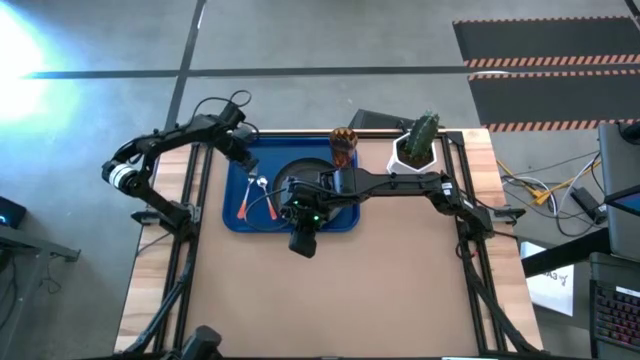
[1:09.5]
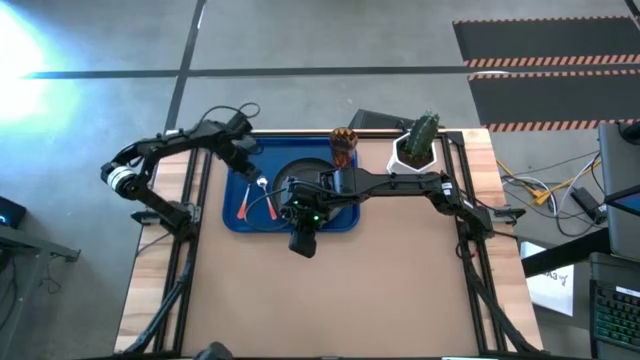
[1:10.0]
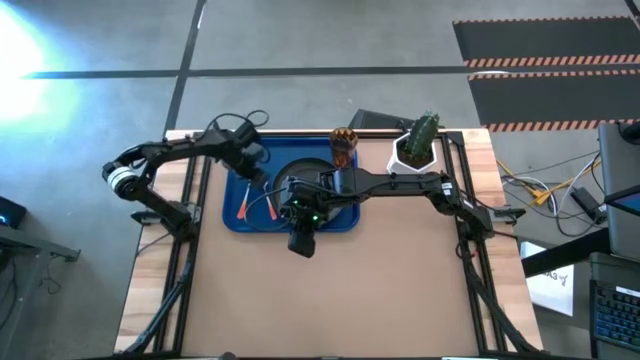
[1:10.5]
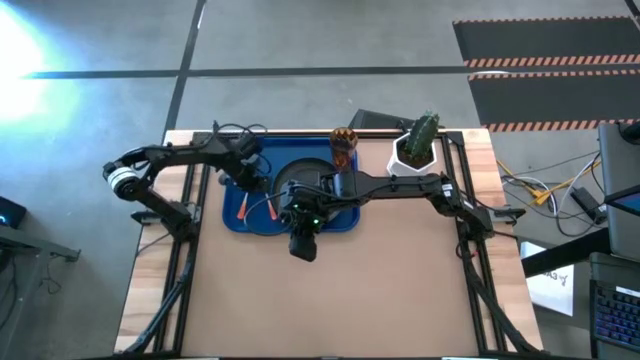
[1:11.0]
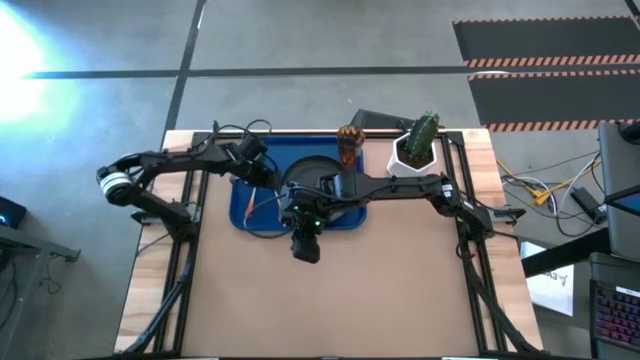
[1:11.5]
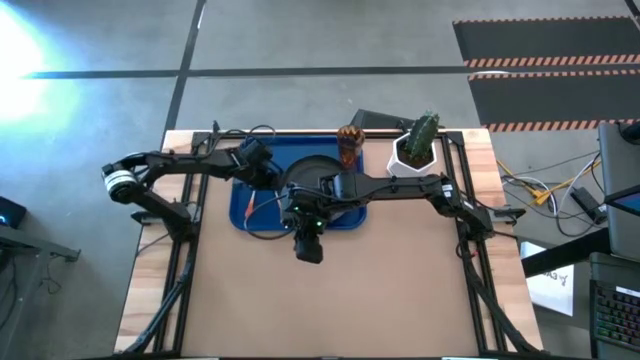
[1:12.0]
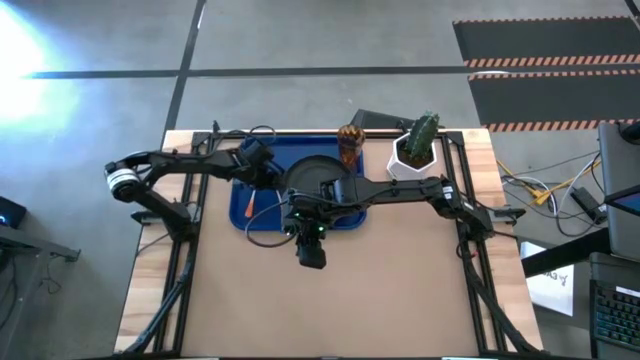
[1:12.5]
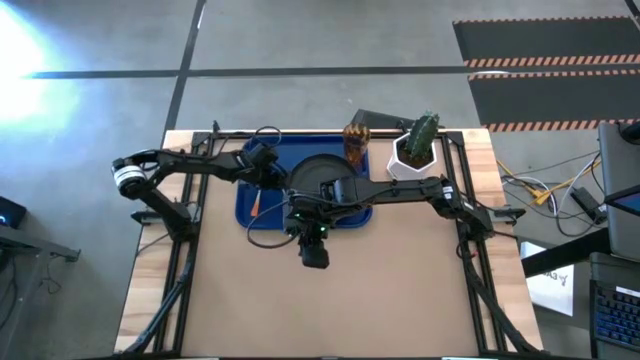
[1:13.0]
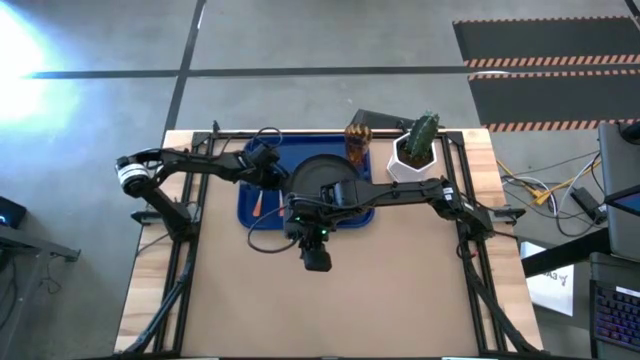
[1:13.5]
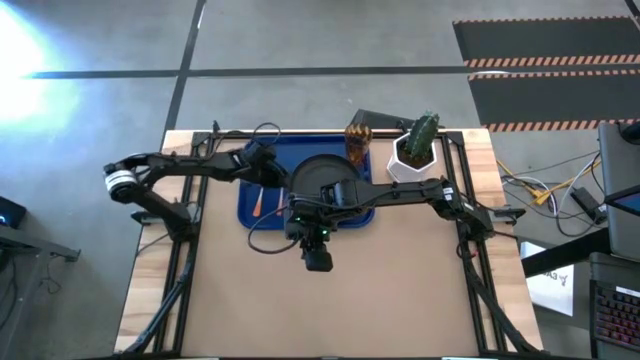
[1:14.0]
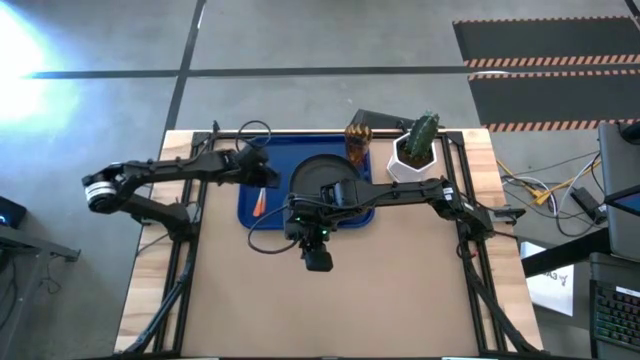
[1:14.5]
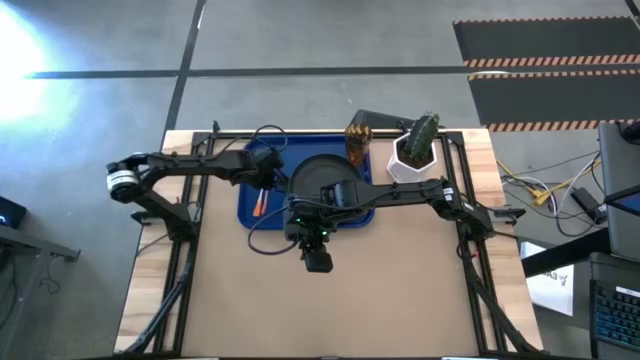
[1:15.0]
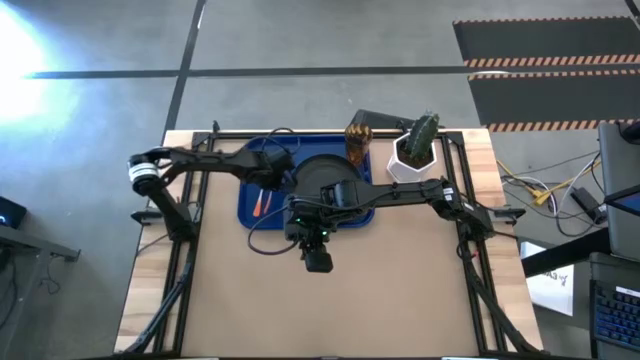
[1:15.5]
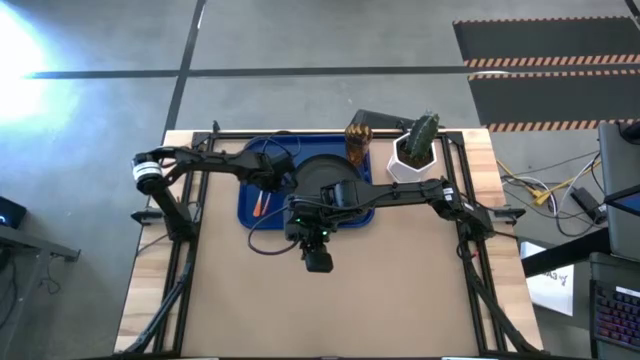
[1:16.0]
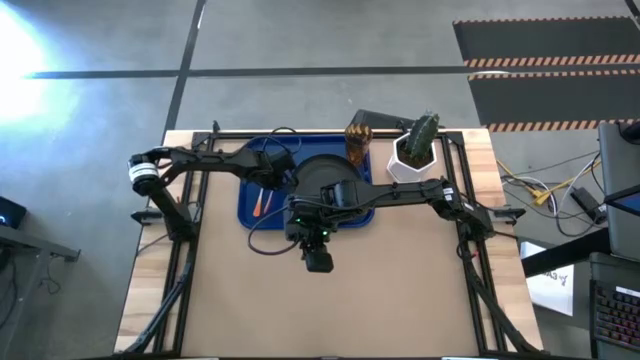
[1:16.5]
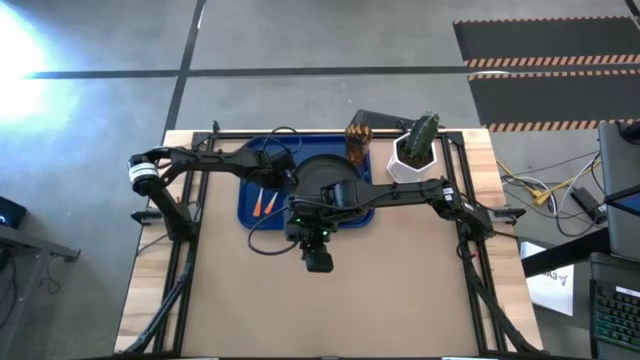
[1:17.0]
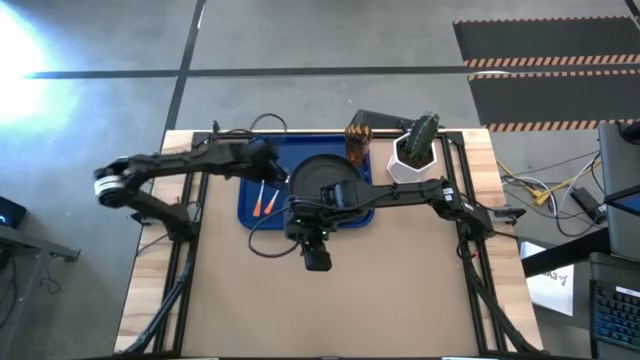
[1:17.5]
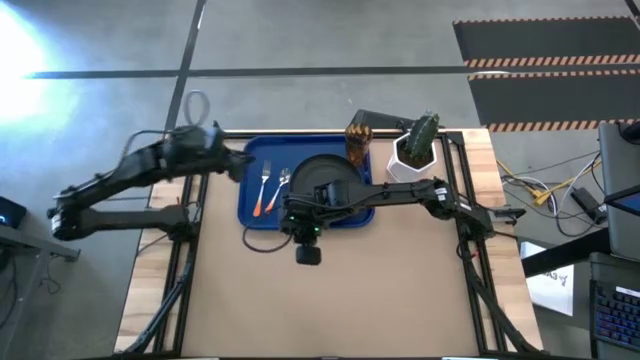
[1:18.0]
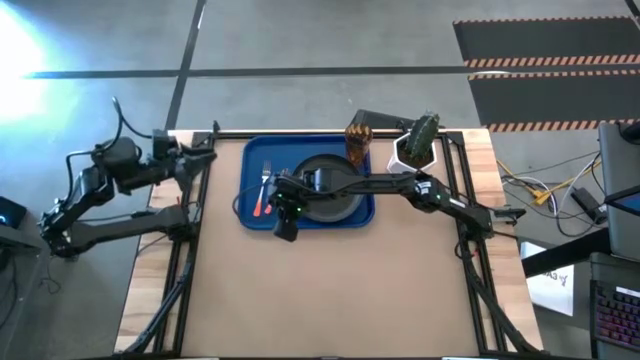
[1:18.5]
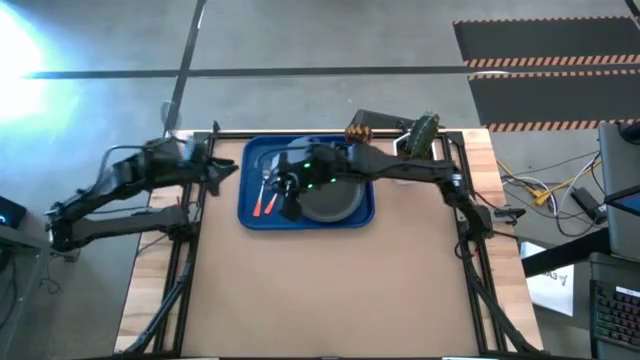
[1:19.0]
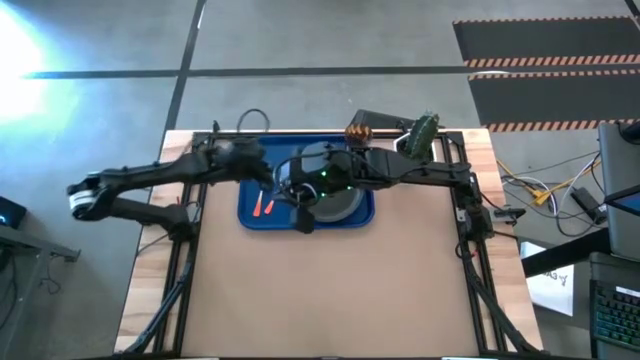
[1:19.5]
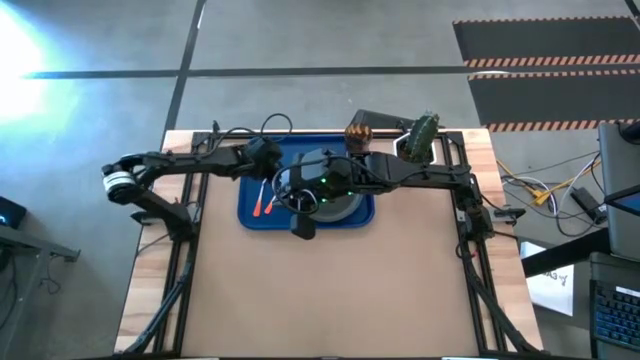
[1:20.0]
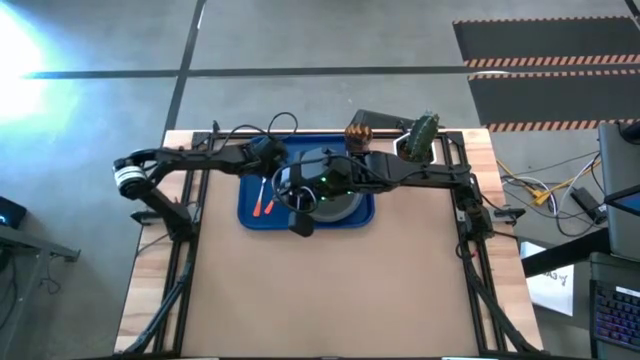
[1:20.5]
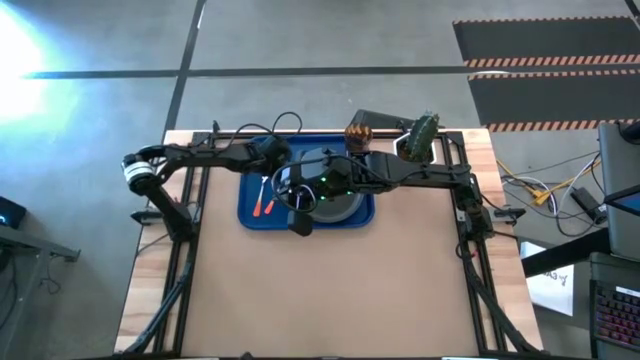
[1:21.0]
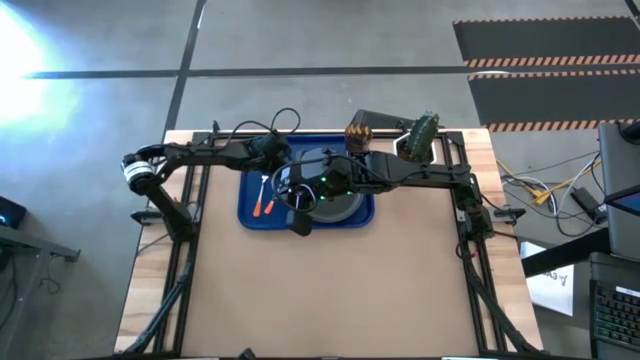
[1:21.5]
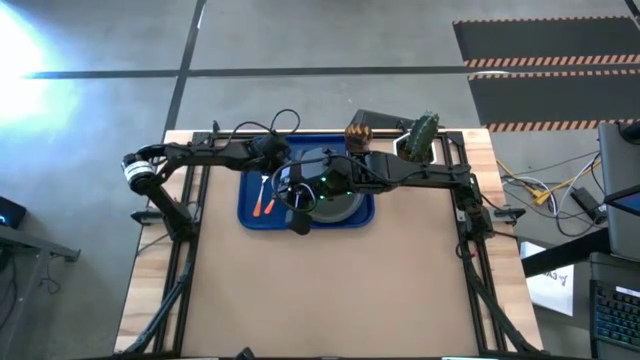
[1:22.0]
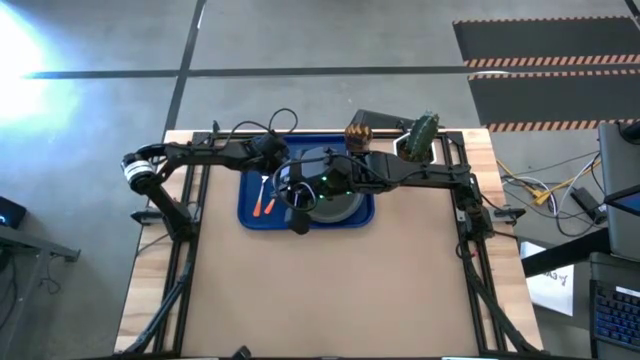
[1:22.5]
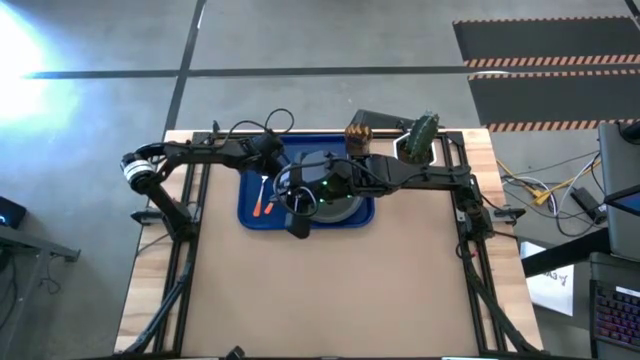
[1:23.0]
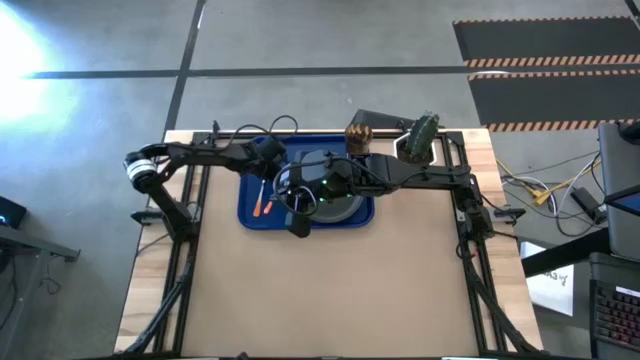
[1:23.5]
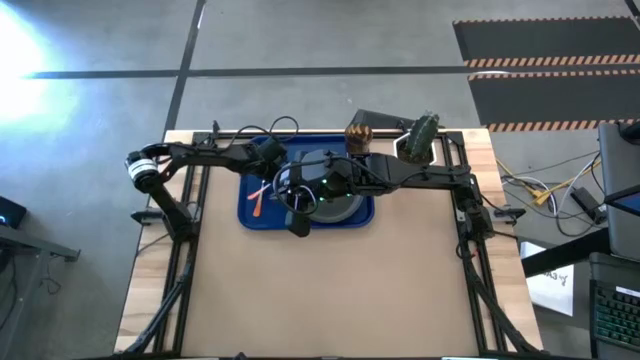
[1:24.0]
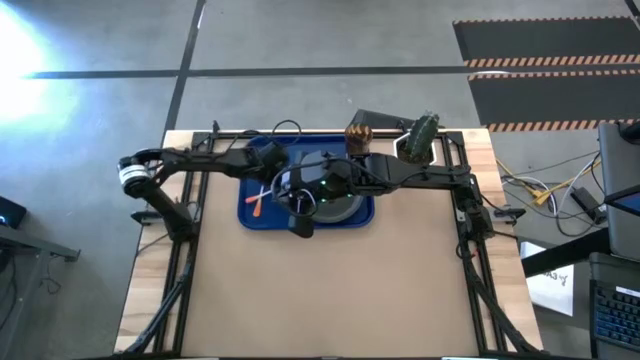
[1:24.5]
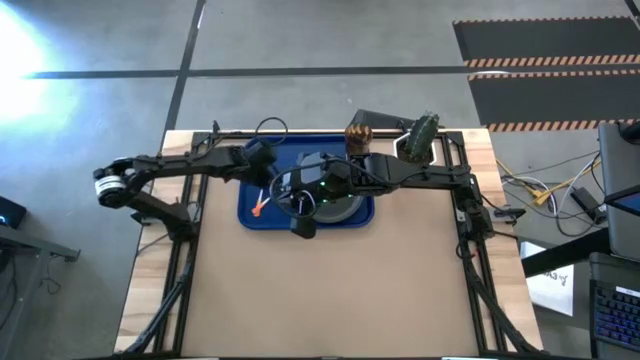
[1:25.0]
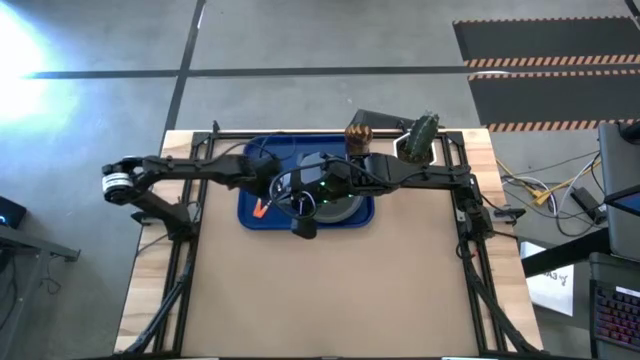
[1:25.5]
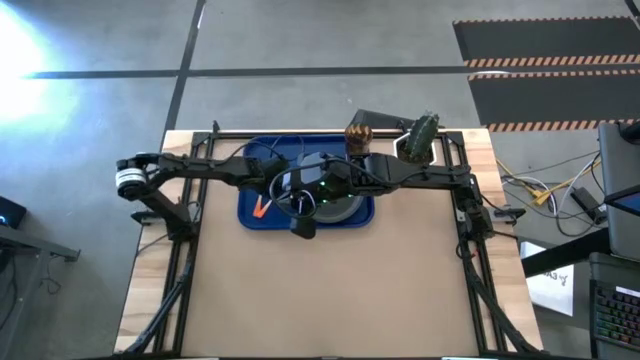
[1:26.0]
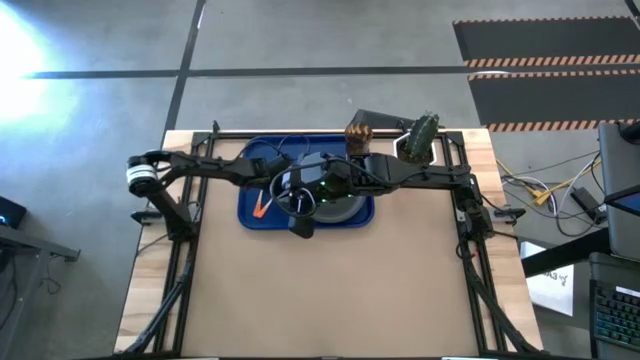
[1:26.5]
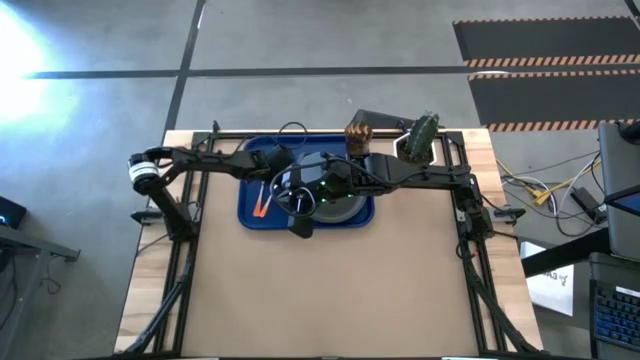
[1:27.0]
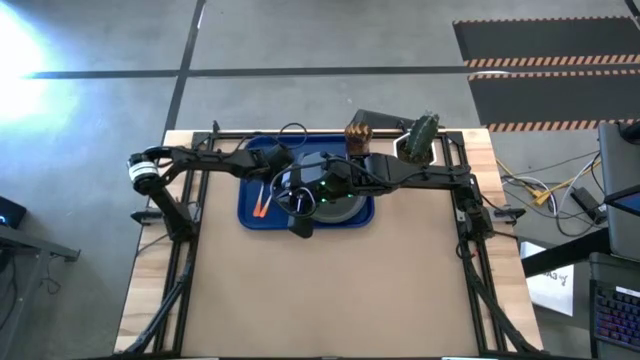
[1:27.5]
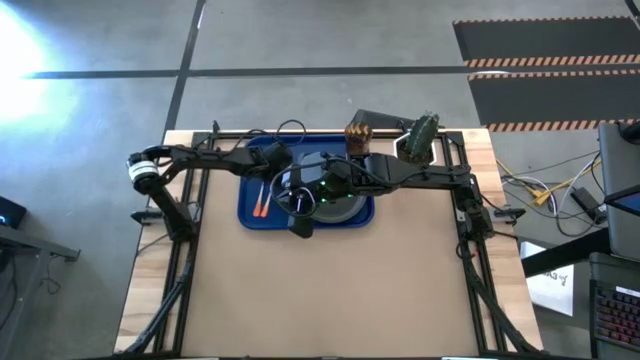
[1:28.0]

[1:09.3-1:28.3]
Task: Pick and place plate/cup/fork/spoon on tray
Adjust the orange spoon on the blue tray

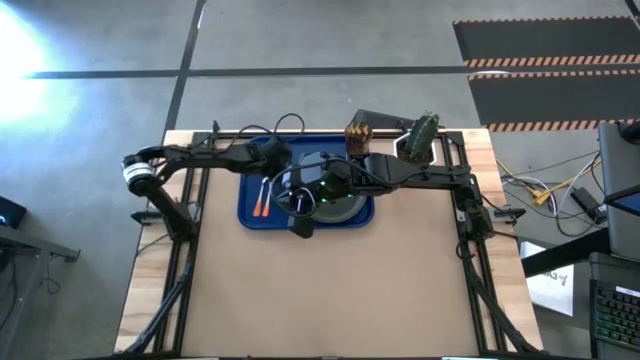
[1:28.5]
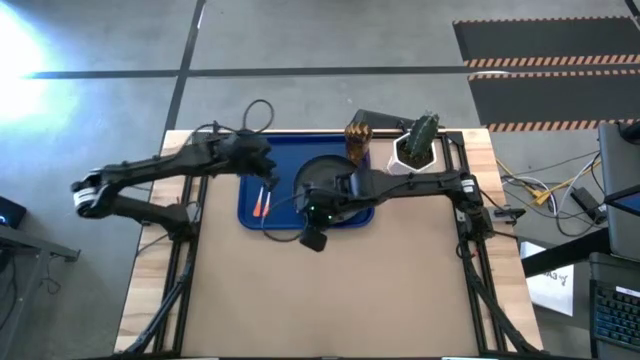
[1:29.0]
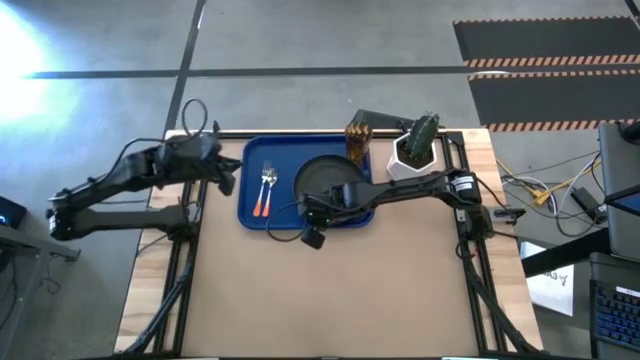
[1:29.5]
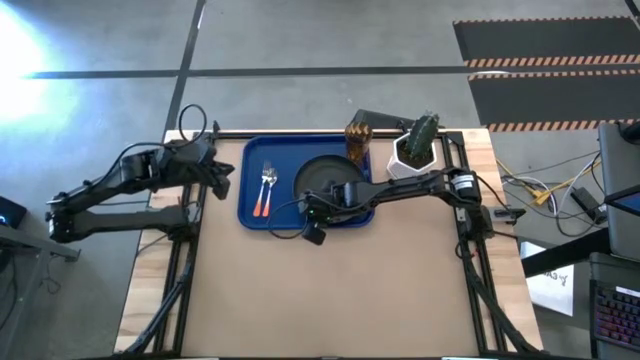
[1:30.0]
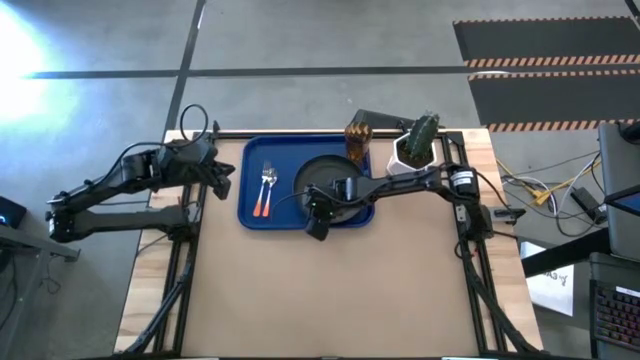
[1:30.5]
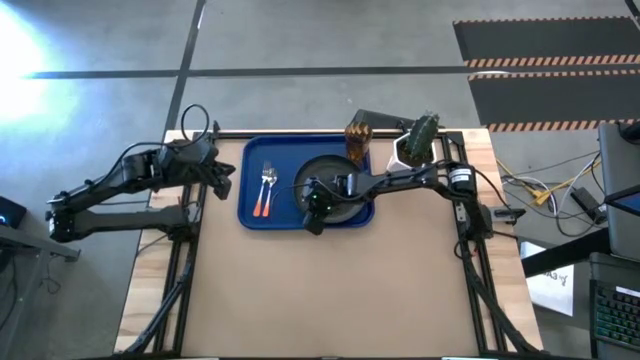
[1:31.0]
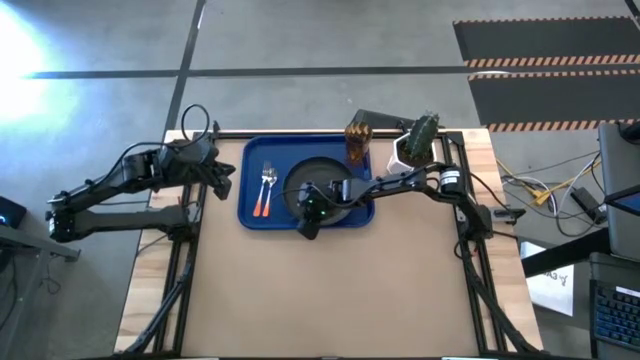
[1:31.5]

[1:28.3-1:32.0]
Adjust the black plate on the blue tray
